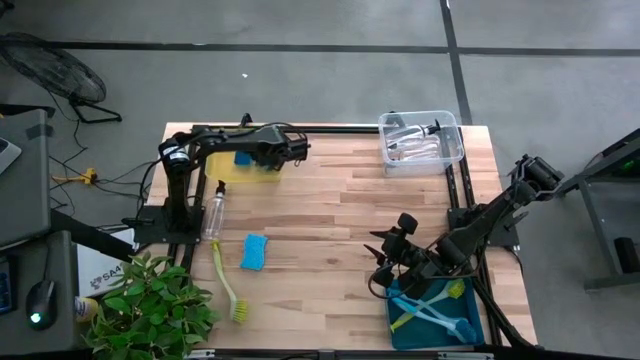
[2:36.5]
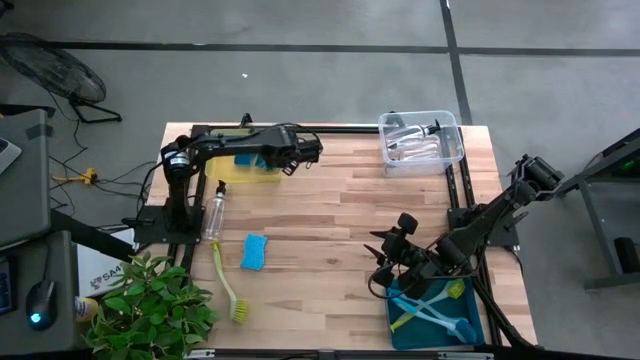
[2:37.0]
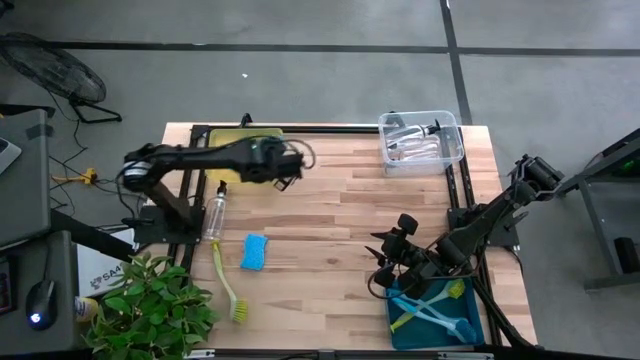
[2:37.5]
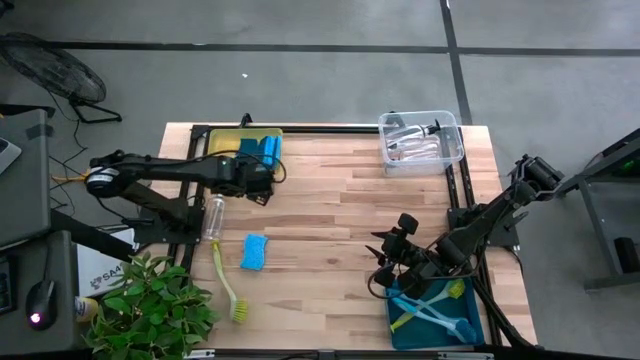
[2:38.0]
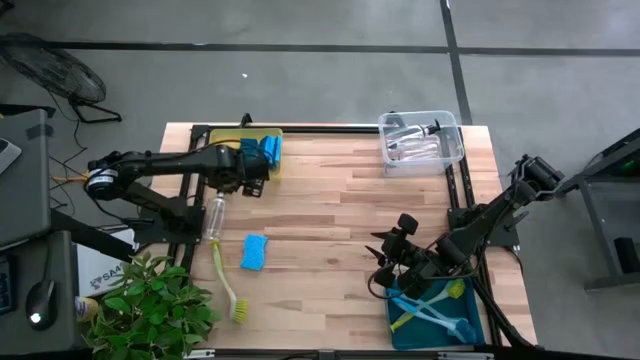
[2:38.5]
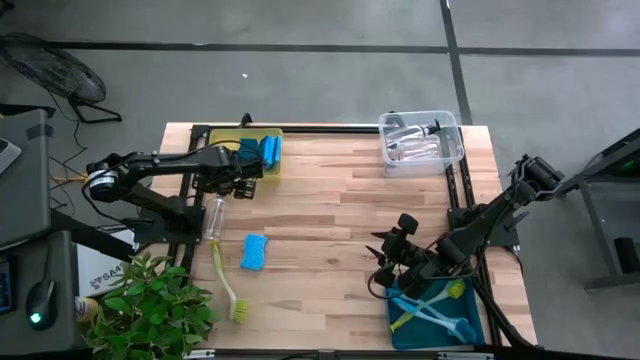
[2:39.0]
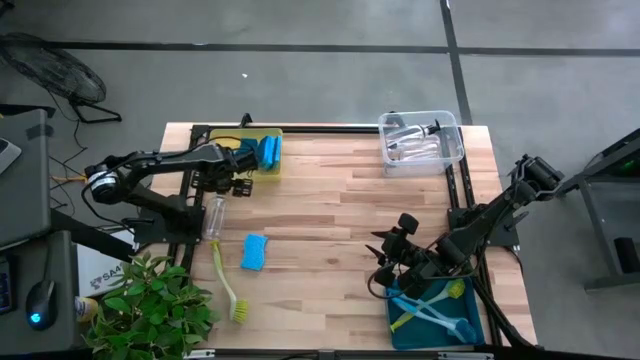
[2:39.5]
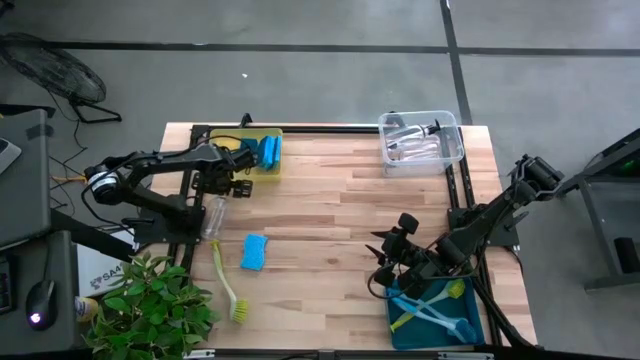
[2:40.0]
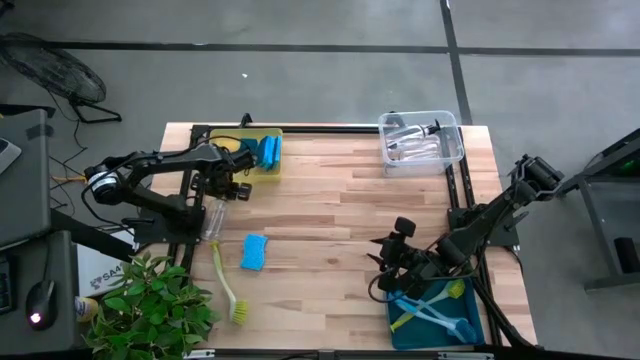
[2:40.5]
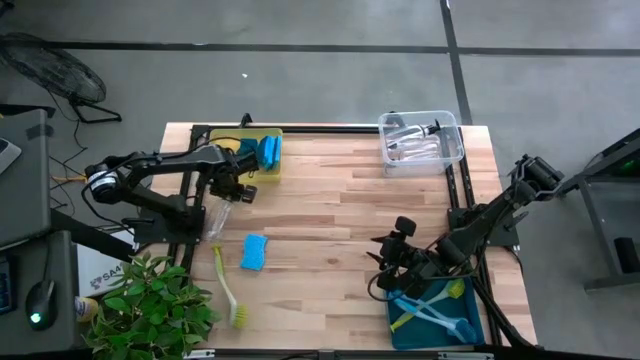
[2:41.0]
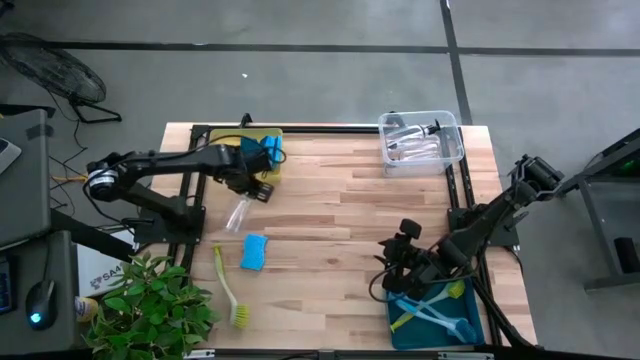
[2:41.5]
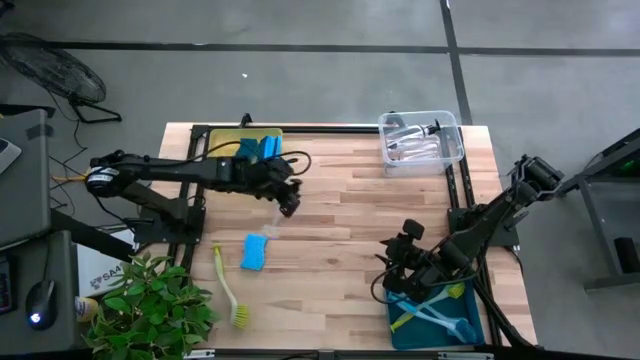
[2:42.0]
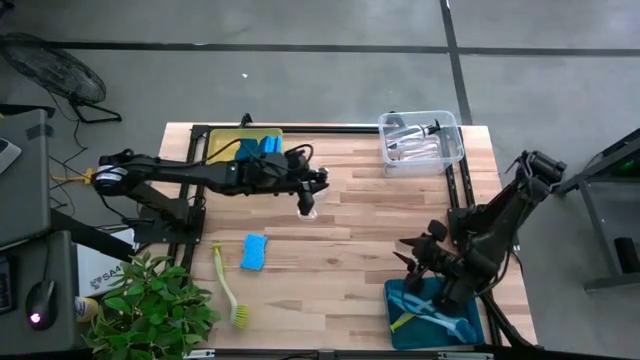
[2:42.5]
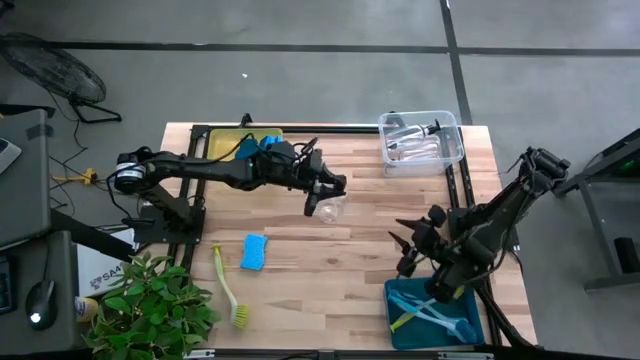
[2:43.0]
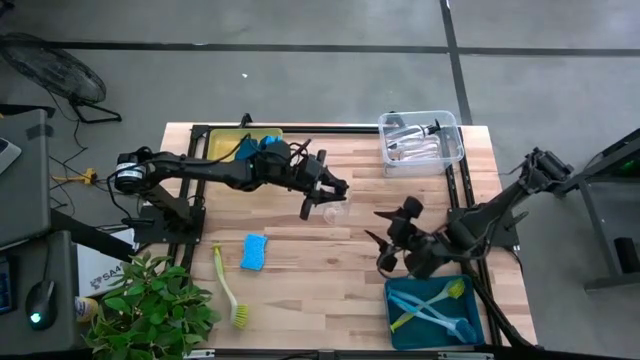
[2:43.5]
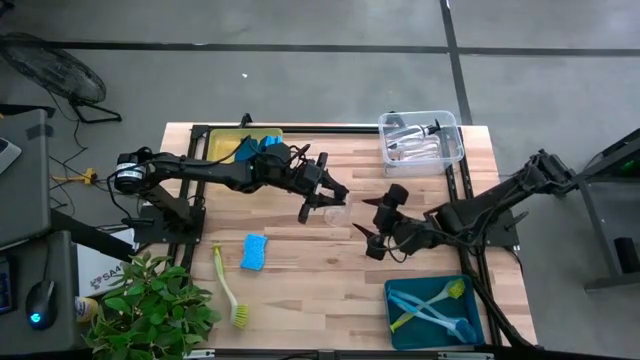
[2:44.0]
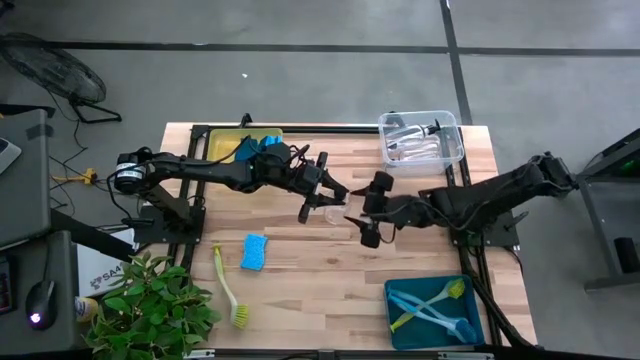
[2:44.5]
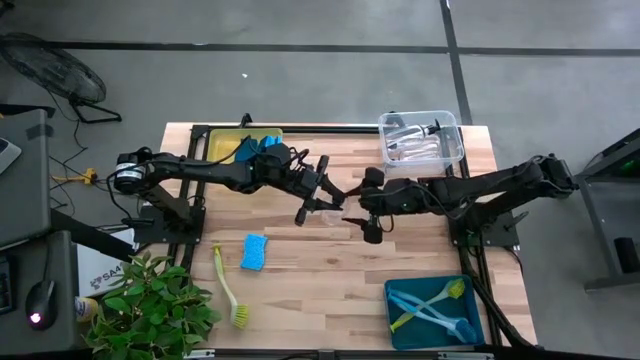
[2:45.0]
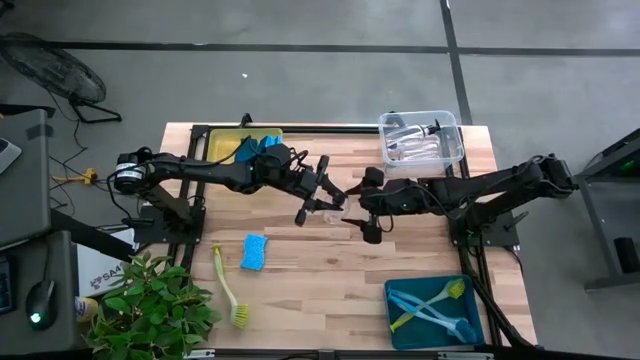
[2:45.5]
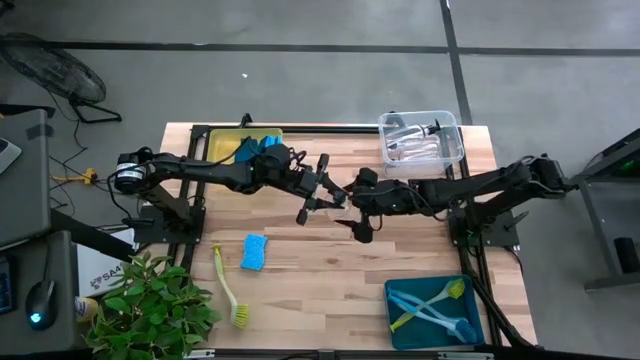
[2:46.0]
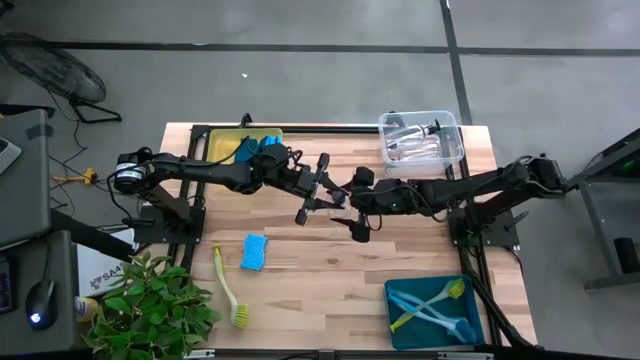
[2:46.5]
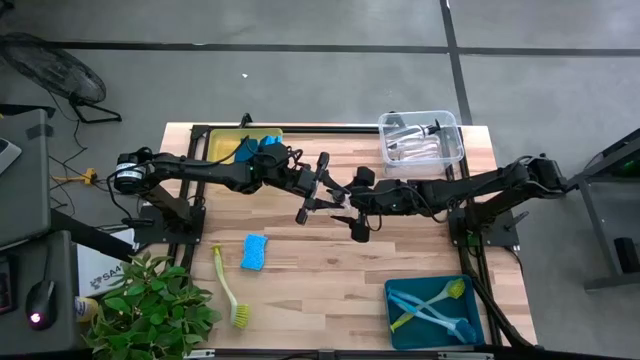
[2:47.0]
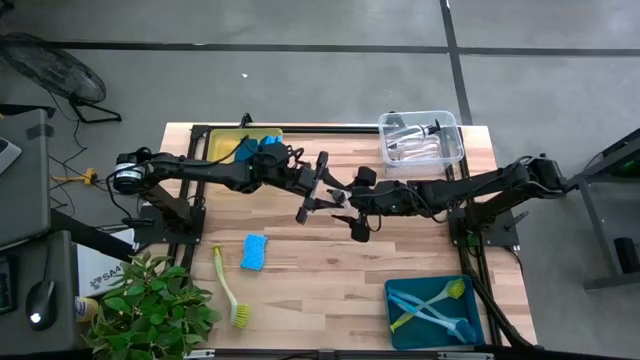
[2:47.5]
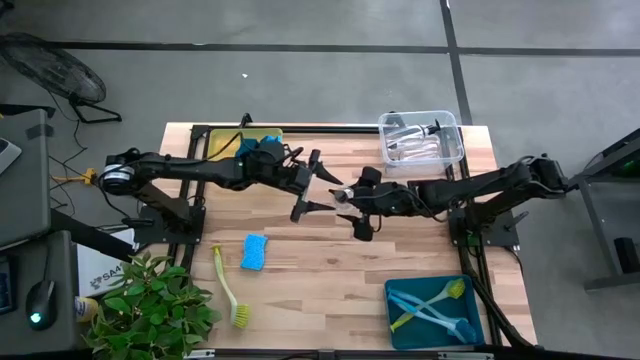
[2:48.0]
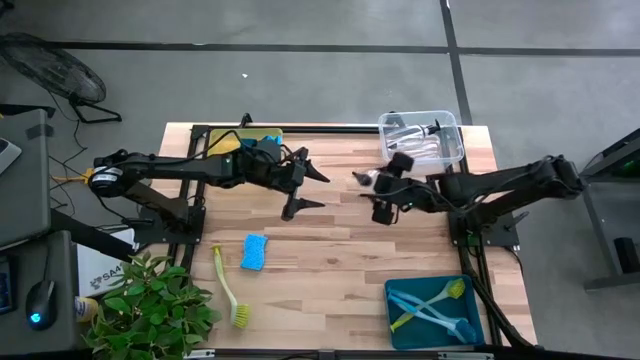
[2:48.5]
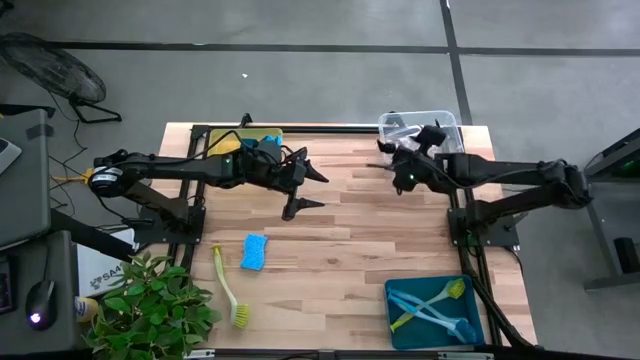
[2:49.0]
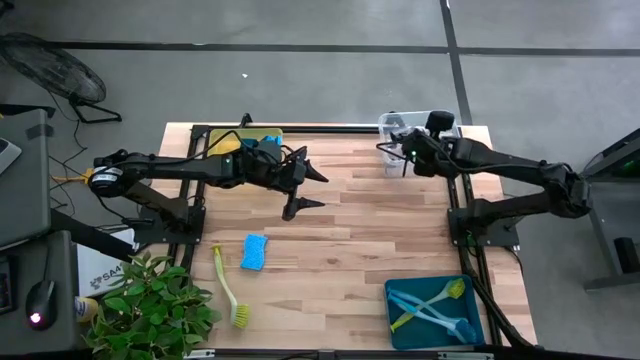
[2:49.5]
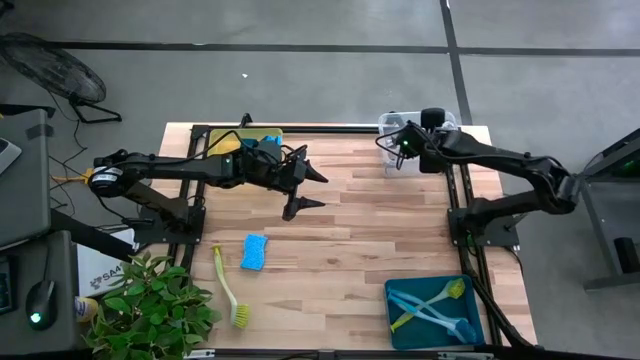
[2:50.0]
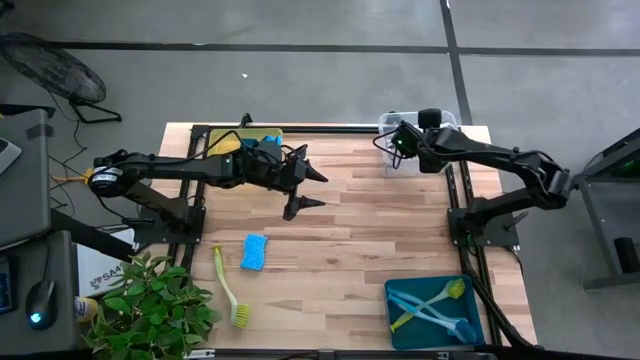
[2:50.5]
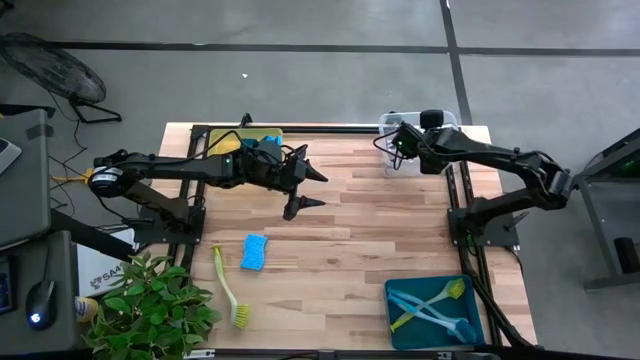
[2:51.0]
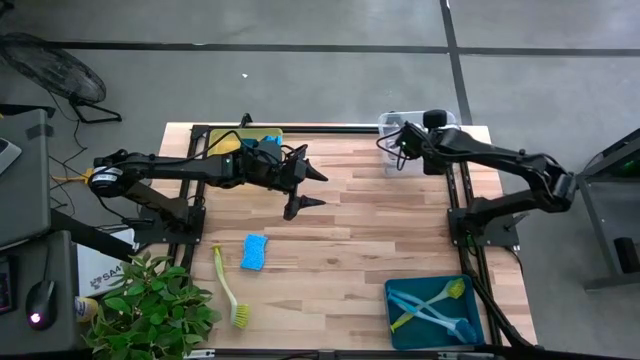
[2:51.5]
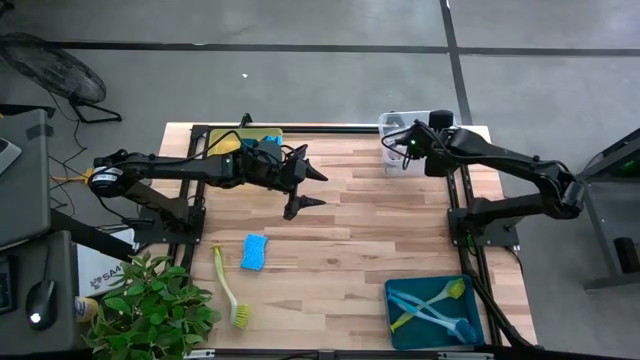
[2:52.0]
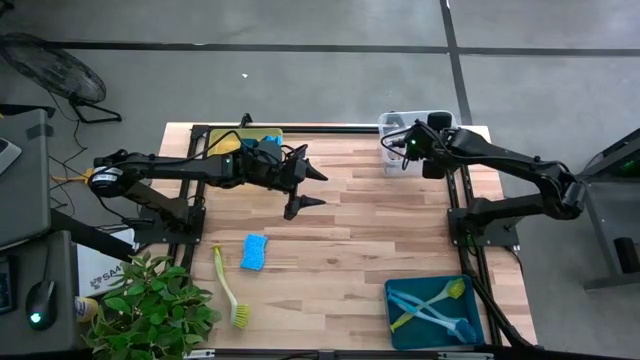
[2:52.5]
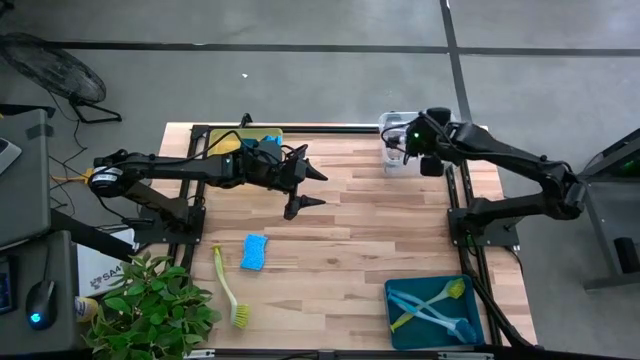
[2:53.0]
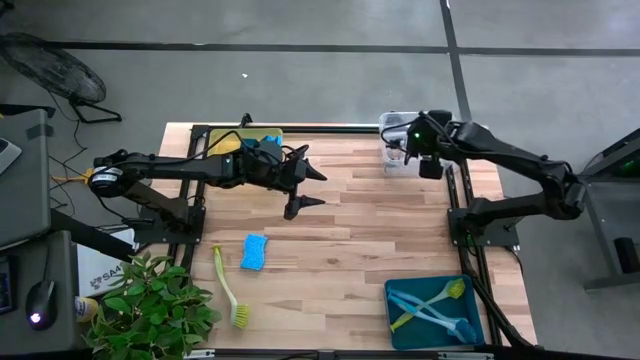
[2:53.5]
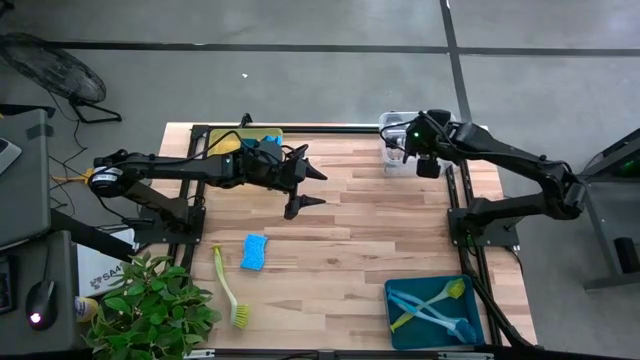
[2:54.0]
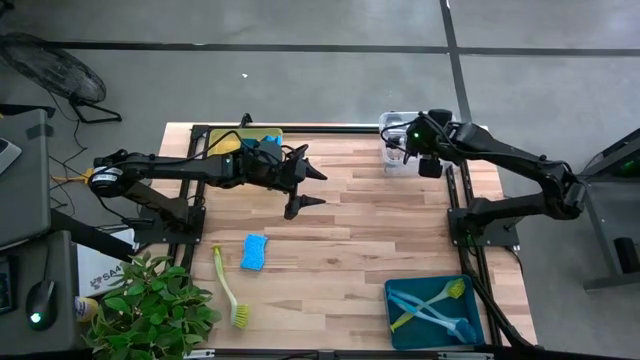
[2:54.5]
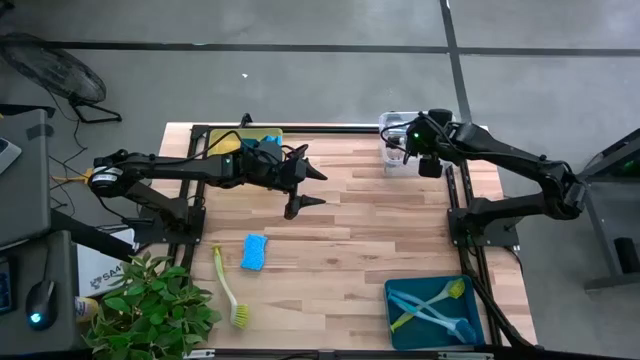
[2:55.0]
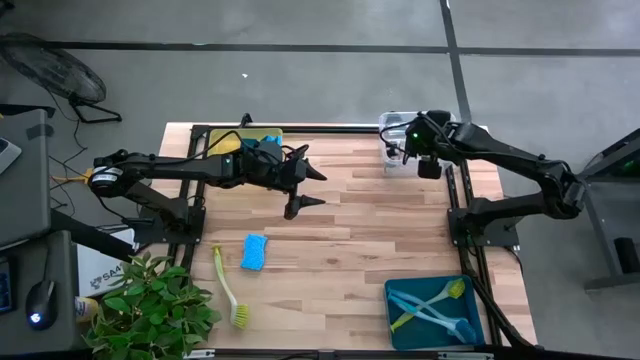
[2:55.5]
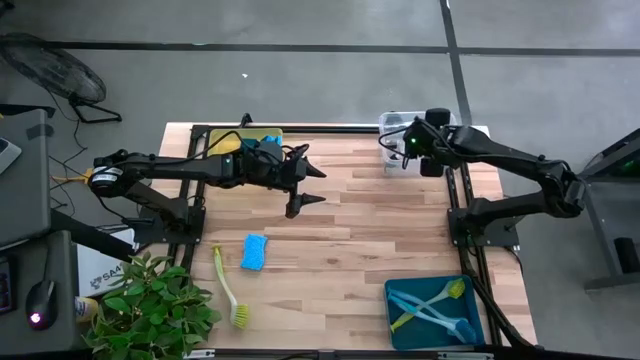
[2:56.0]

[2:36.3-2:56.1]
Task: Pick & Place Kitchen Sink Supplies
Put the transparent soap dispenser into the transparent bin

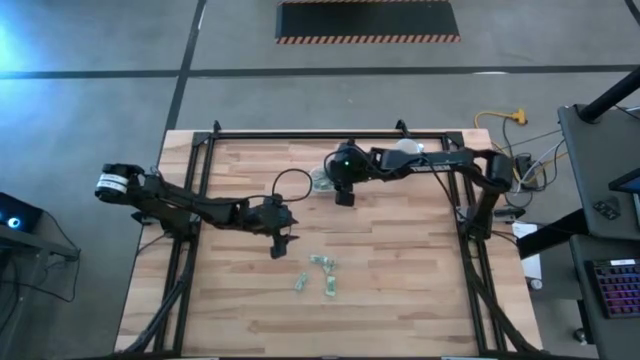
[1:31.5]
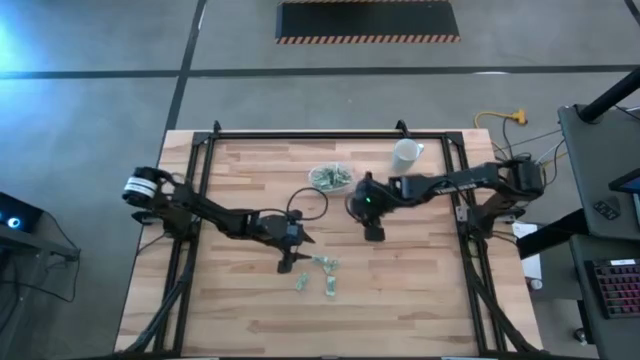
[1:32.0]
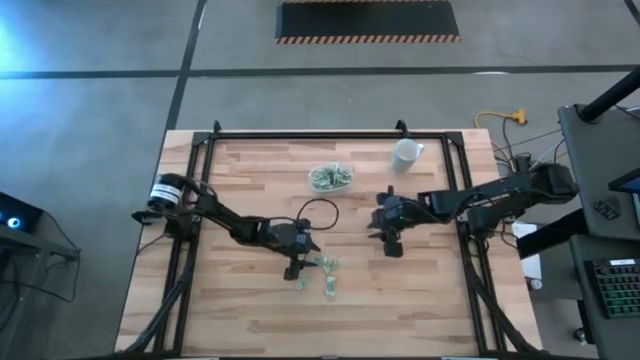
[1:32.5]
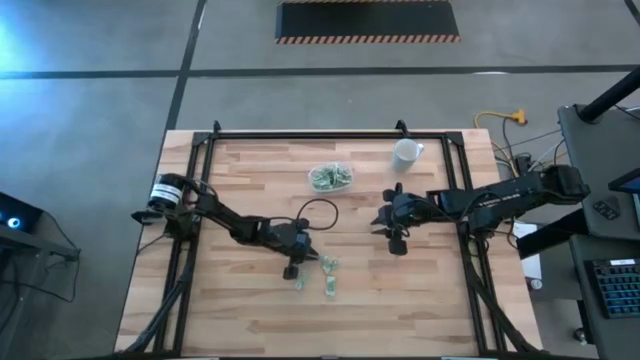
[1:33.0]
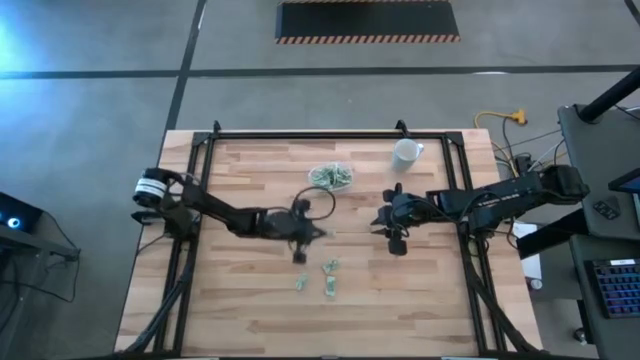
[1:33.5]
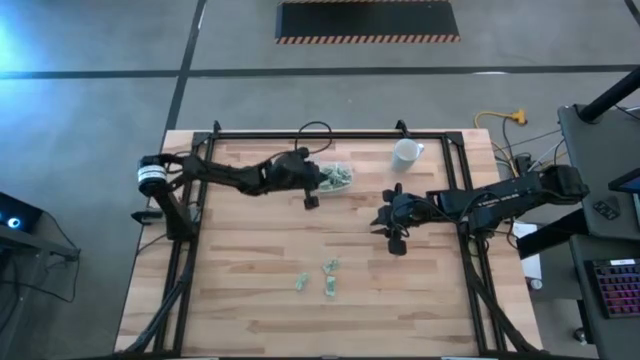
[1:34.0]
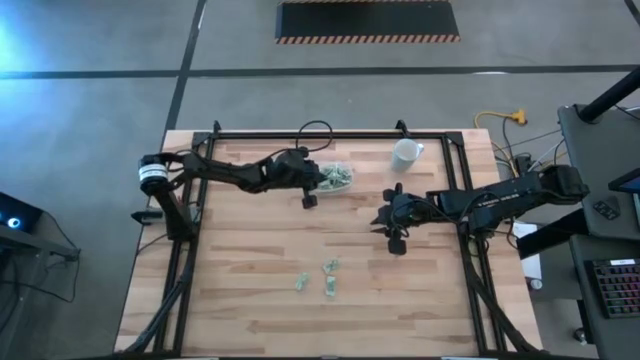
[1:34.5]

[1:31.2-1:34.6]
Task: Pick and place Stevia / Truvia into bins
Put the stevia packet into the transparent container
